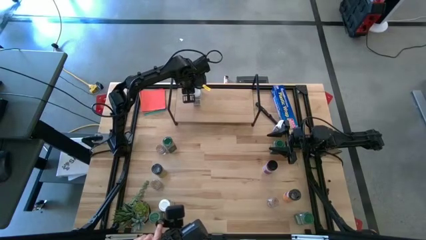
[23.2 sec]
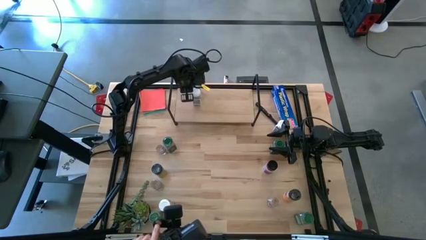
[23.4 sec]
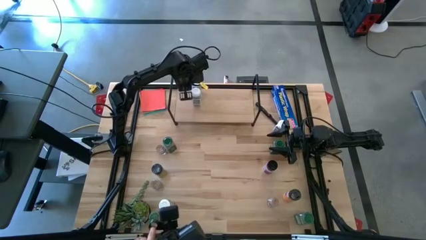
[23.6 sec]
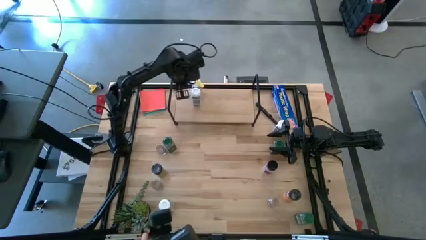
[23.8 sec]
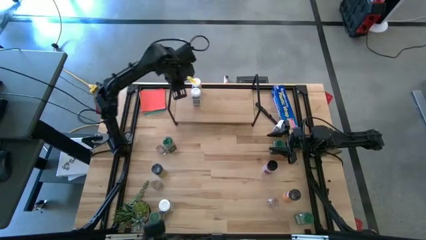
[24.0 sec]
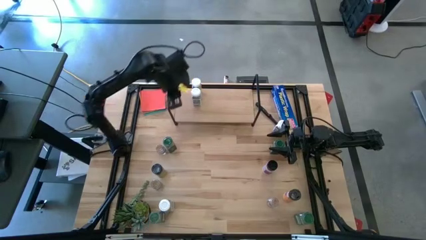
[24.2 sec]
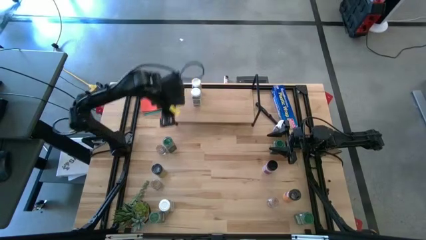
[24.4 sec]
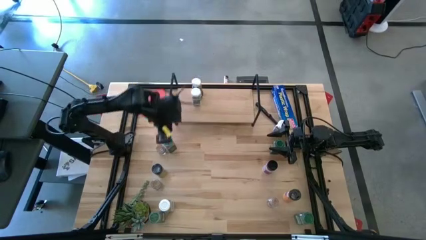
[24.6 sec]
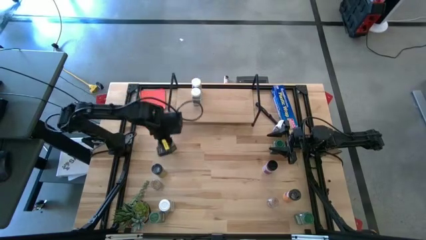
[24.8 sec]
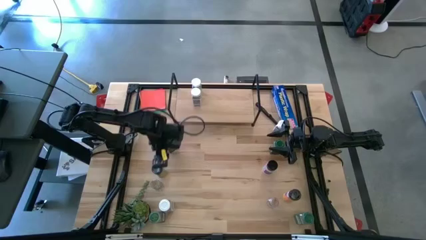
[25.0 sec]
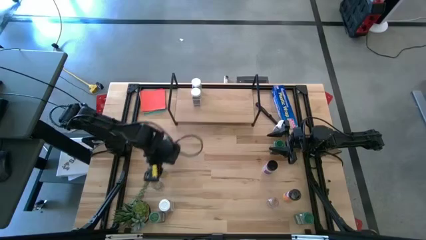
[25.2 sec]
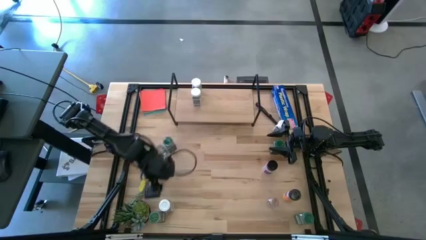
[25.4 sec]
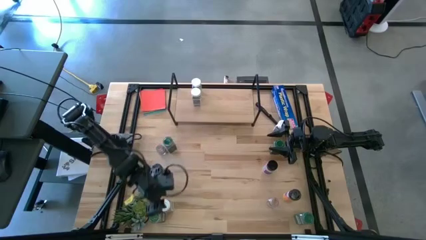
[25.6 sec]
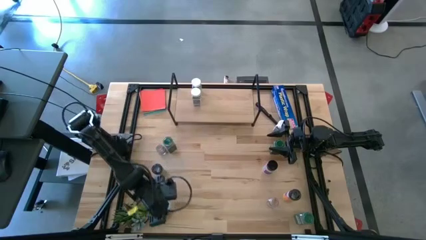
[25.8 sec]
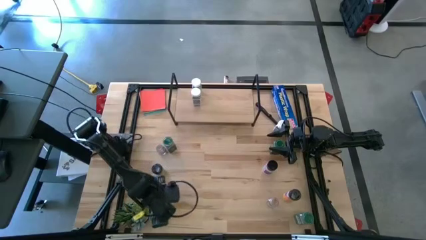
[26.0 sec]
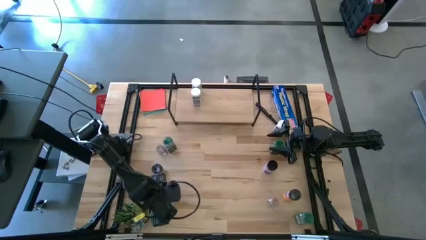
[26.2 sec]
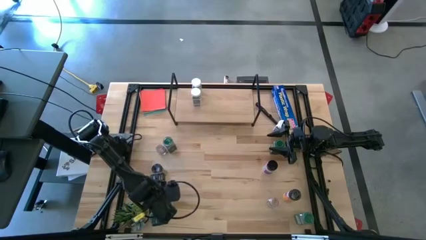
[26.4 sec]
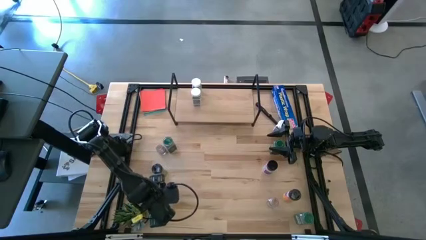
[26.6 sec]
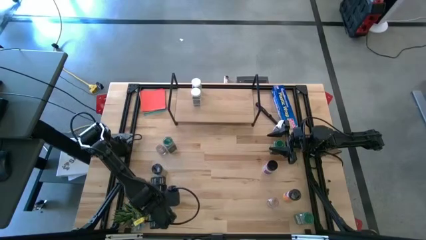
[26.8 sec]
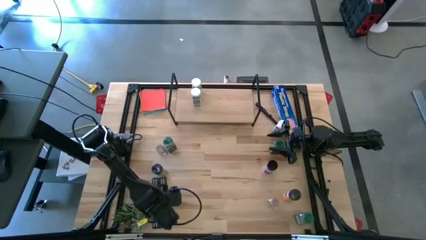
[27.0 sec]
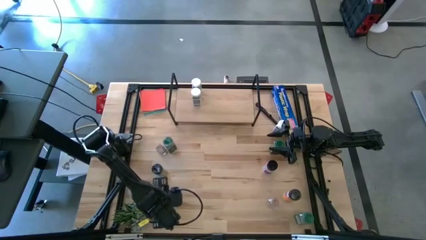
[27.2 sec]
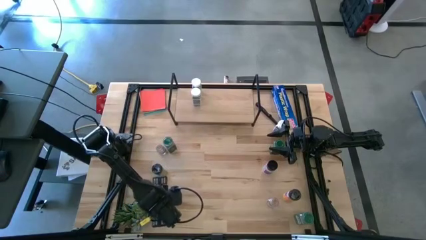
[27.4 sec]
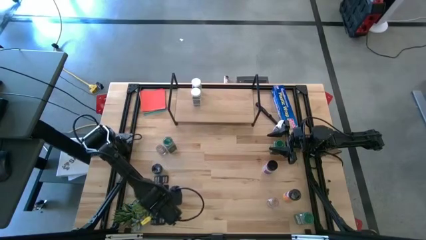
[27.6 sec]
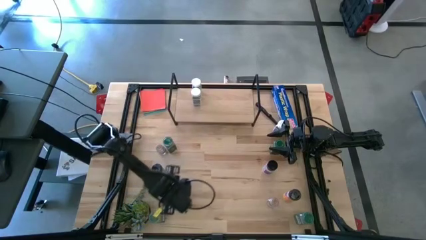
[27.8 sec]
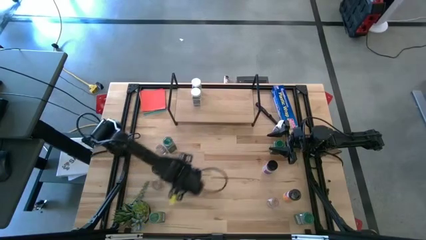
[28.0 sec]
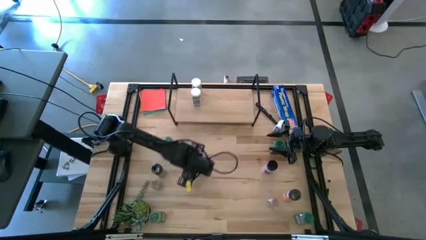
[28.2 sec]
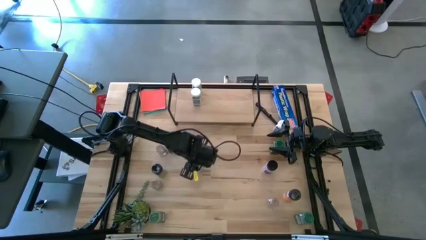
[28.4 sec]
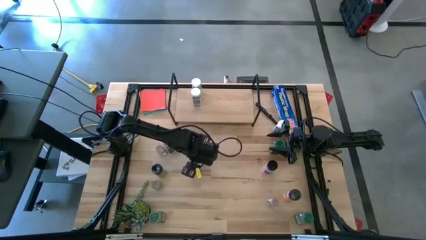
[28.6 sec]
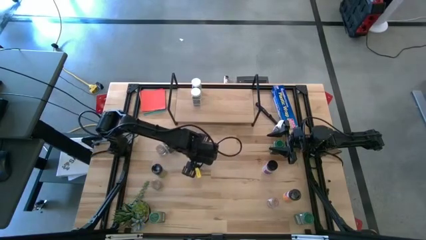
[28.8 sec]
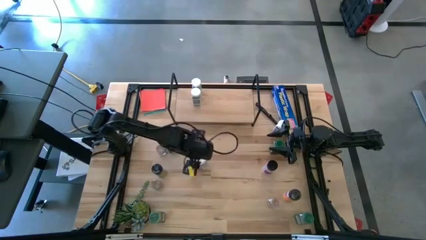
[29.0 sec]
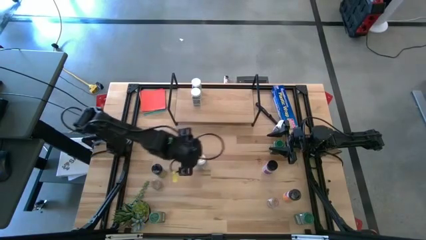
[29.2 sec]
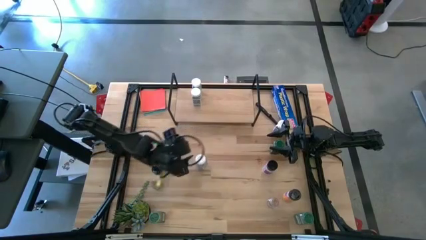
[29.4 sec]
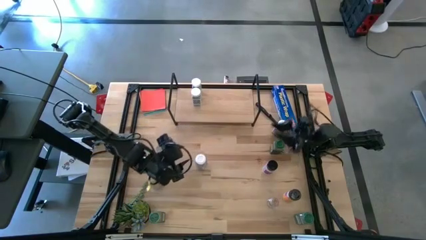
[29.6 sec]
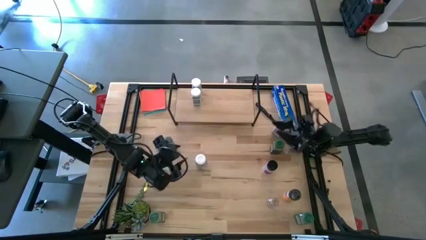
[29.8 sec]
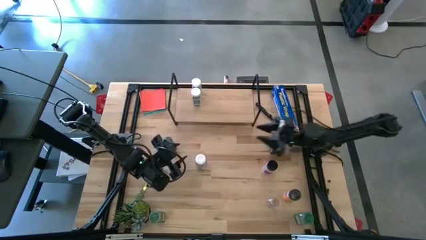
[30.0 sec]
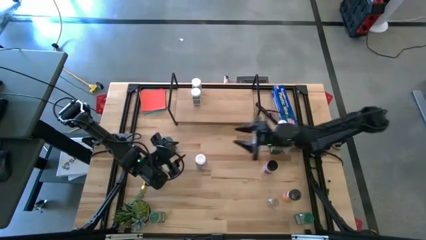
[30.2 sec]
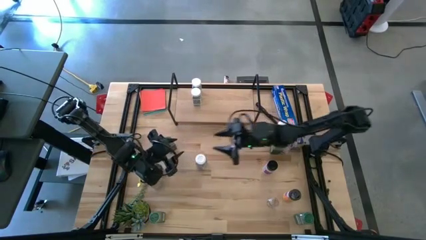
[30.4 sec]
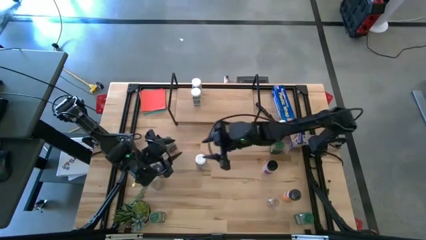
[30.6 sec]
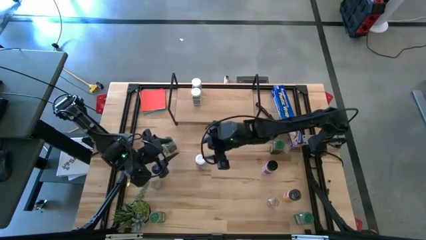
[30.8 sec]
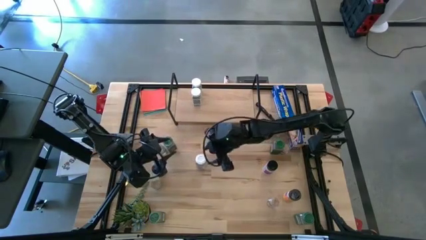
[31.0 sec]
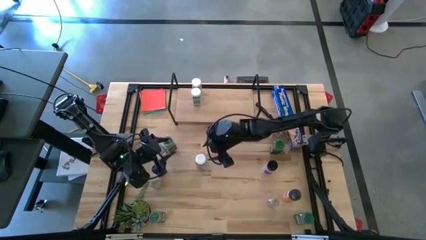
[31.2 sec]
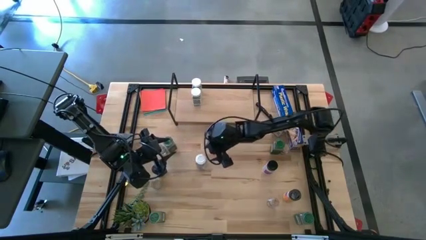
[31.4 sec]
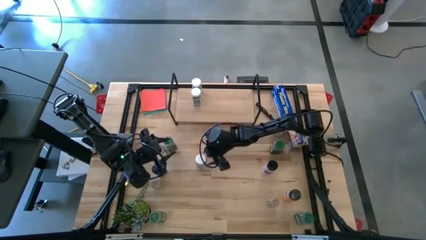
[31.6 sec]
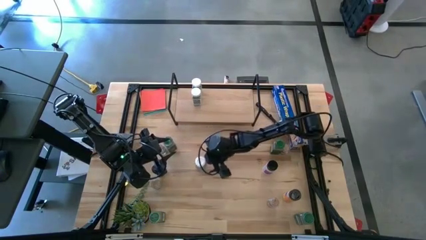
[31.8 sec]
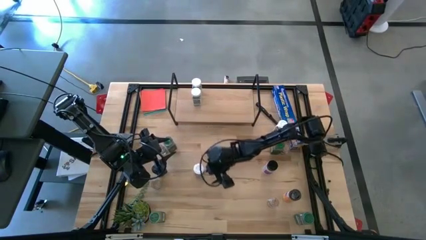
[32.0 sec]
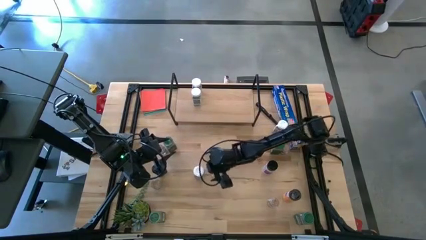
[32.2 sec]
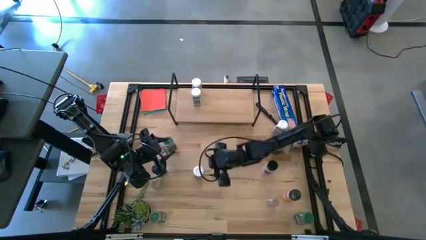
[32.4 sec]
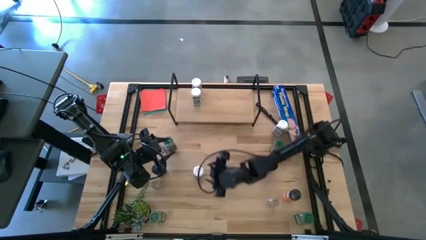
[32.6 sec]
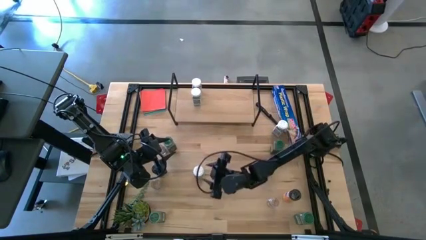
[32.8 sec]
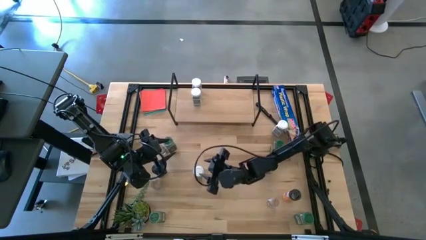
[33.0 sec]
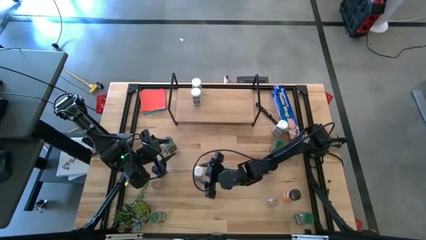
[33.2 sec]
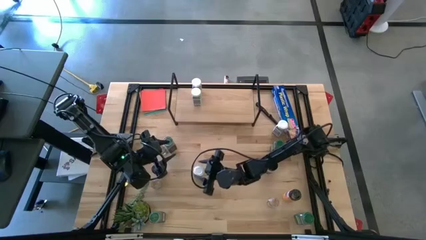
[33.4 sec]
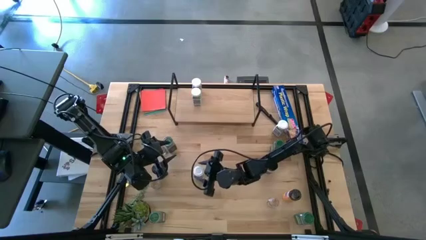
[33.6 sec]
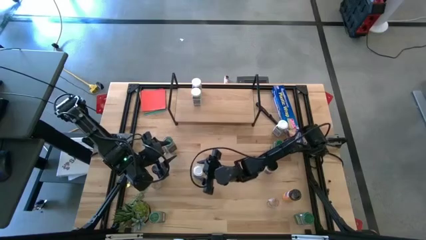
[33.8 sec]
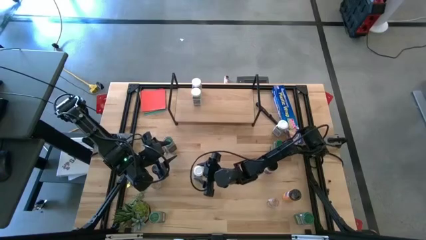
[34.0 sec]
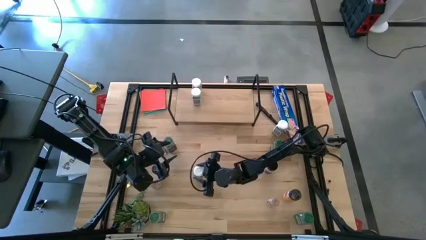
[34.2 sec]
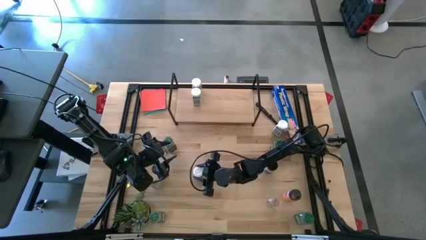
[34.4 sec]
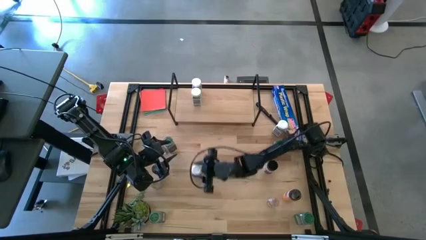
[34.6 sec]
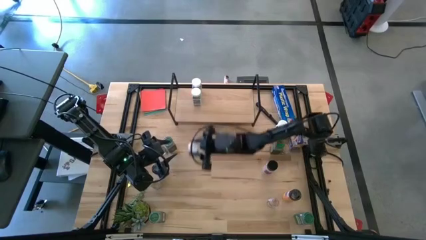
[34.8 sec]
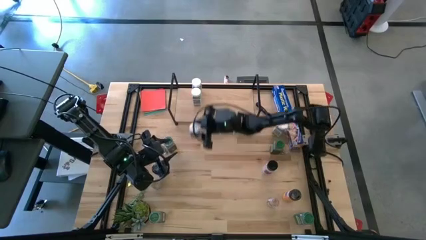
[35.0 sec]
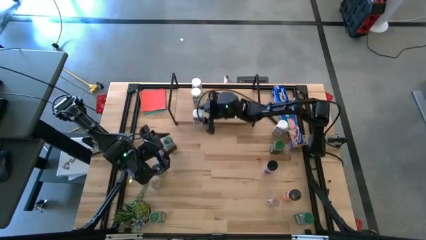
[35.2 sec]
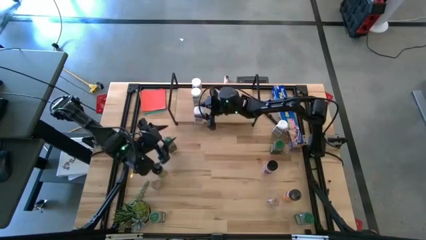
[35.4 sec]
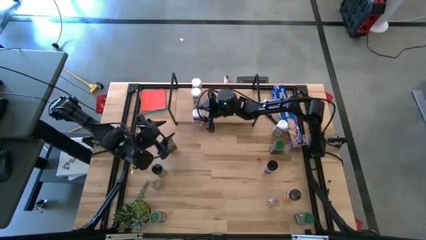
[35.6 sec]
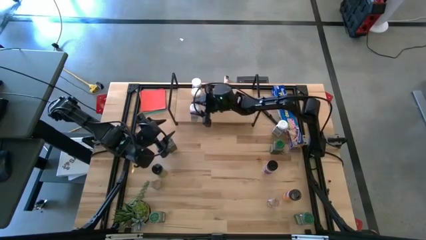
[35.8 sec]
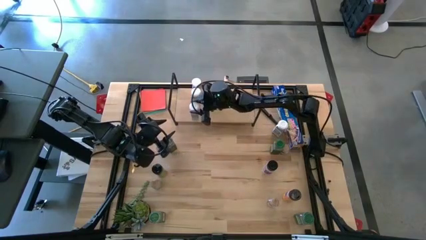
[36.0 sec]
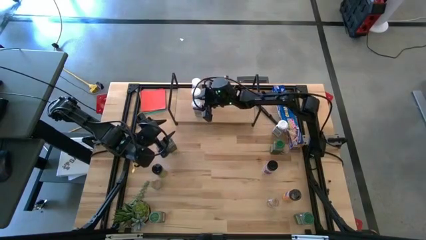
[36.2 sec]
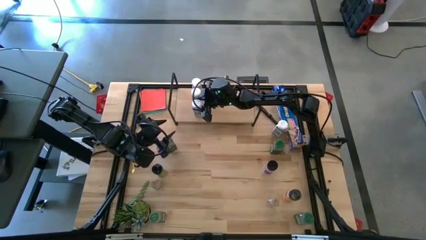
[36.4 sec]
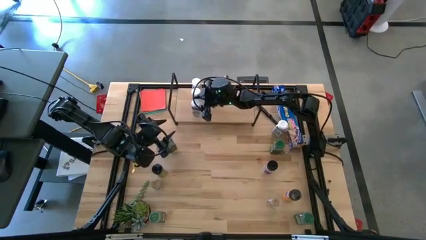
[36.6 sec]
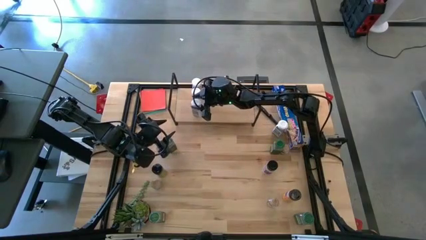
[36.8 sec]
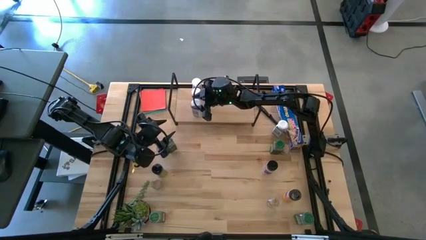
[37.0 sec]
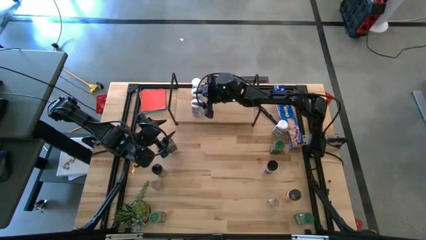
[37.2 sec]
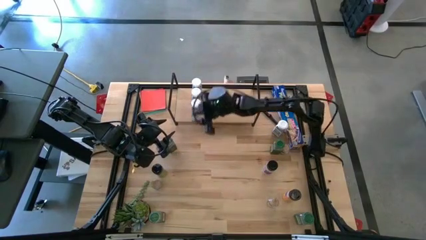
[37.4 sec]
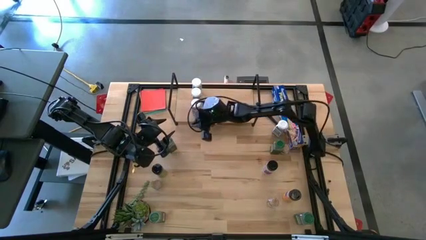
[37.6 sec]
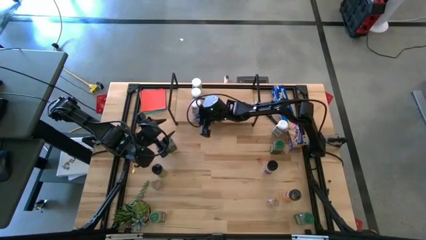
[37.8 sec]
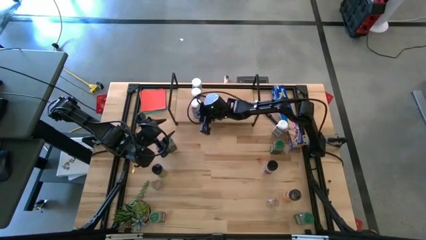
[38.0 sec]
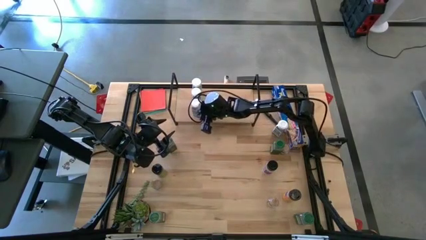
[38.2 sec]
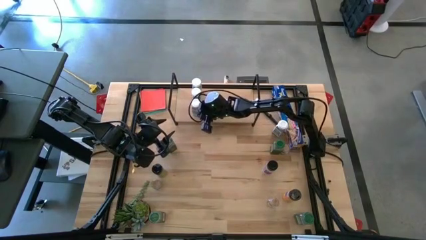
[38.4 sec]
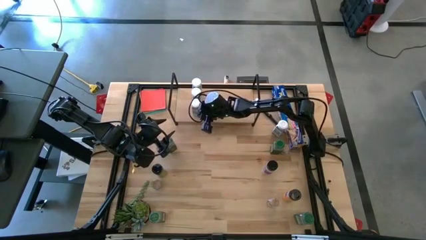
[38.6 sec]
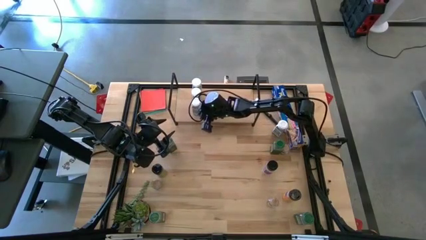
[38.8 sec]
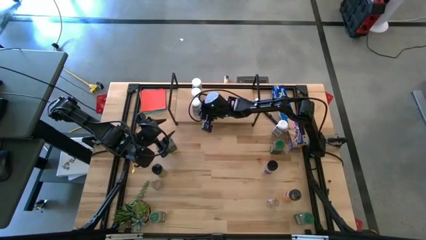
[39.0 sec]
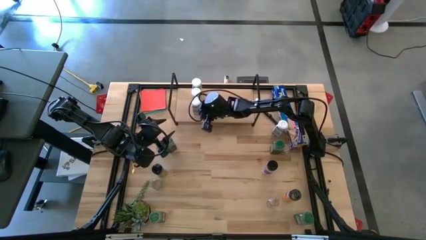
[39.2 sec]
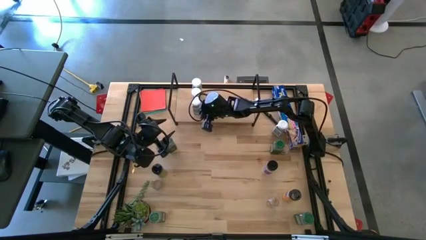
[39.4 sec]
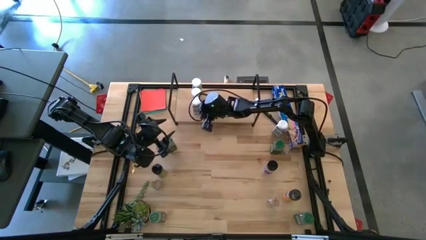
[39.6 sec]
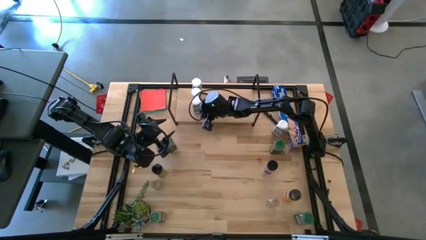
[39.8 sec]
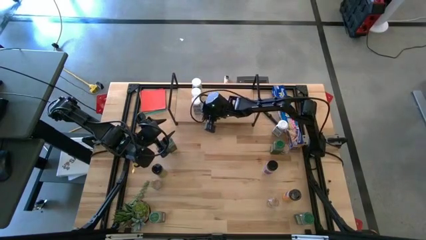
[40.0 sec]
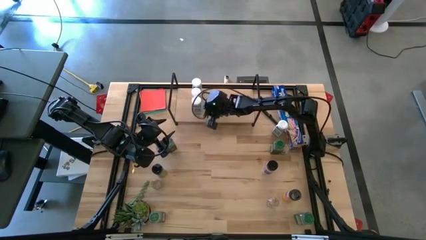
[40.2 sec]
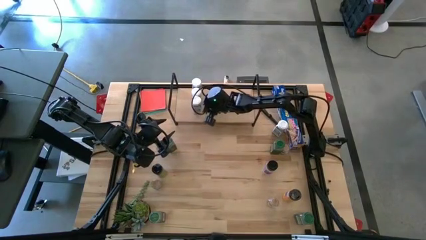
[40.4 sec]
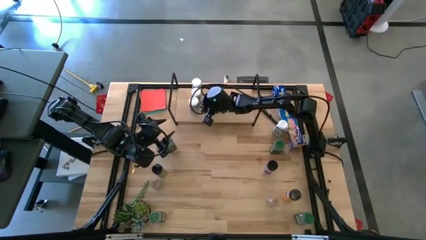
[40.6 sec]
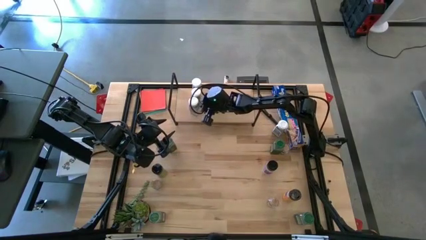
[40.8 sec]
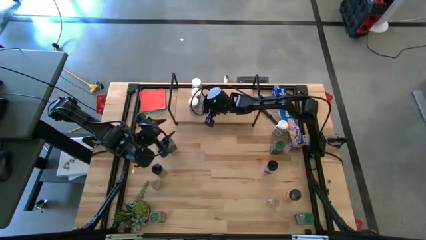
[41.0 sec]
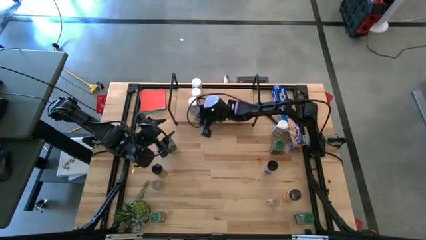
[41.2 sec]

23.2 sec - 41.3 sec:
Task: Shelf spices
Put the bottom white seasoning bottle on the shelf aligned with the other white seasoning bottle
